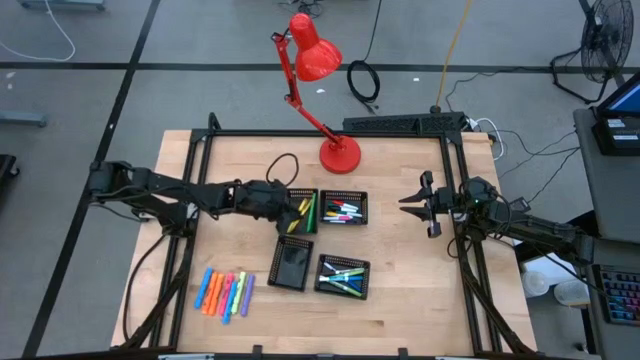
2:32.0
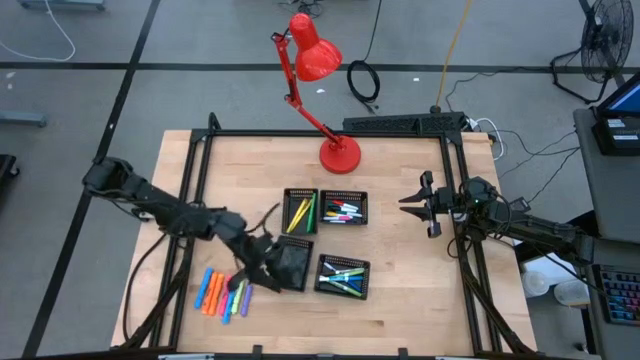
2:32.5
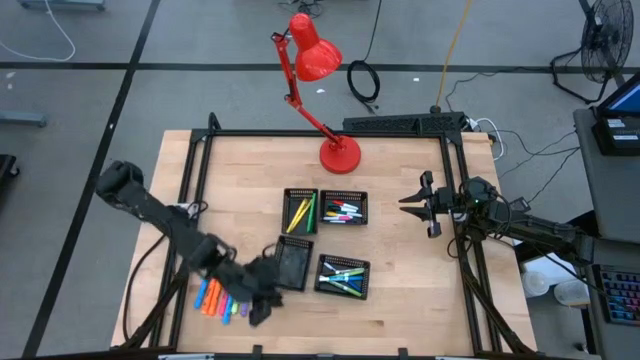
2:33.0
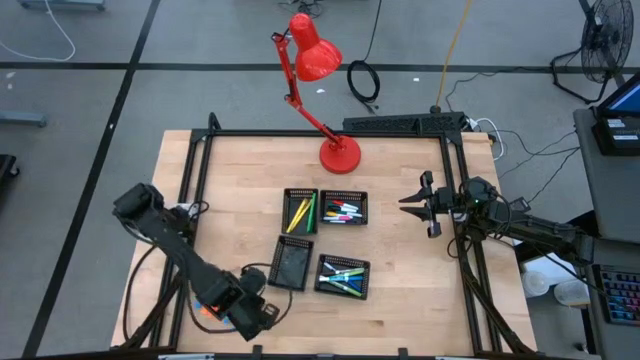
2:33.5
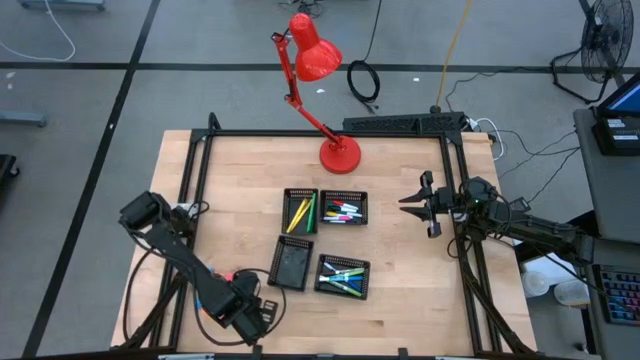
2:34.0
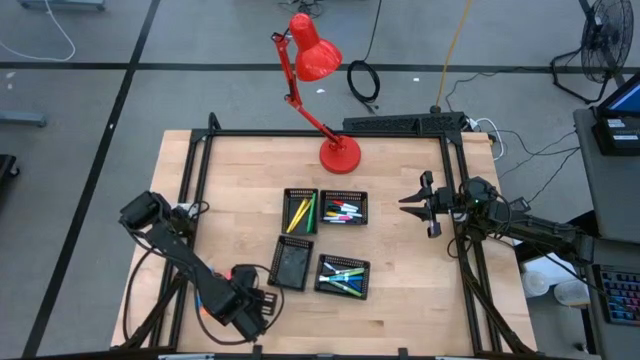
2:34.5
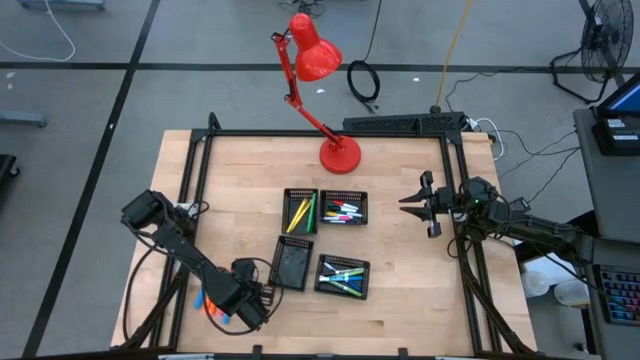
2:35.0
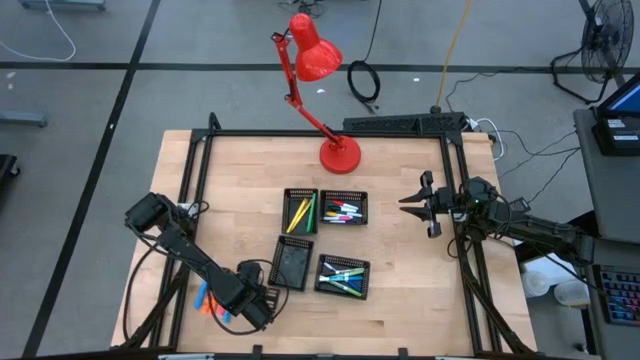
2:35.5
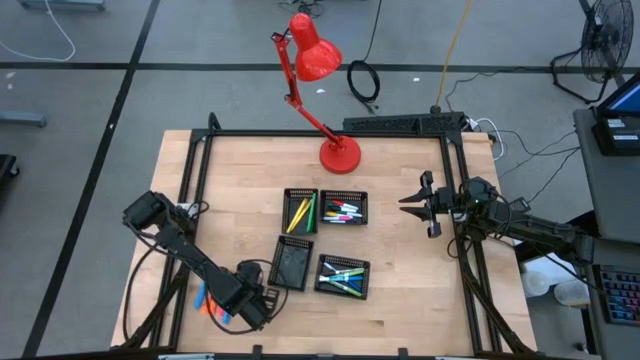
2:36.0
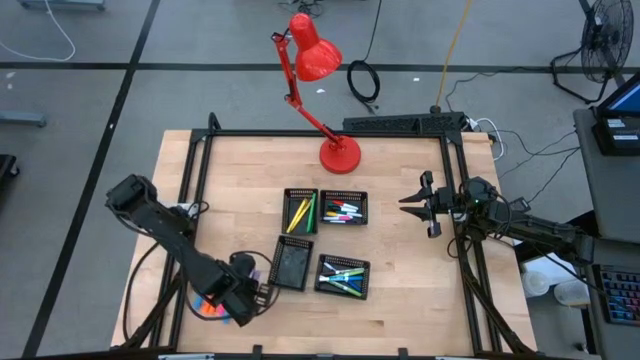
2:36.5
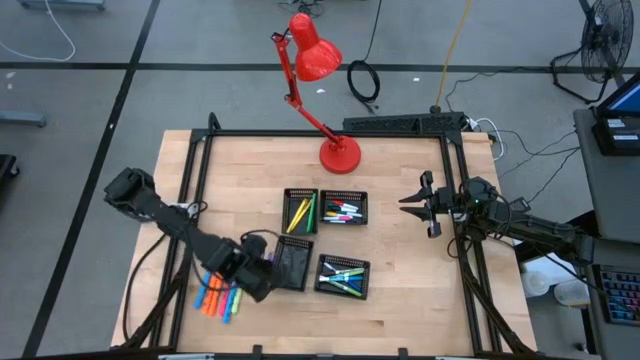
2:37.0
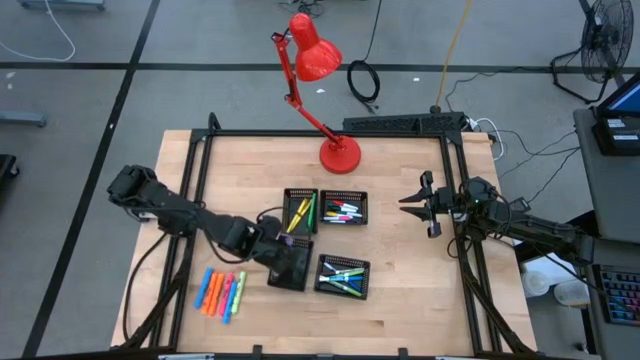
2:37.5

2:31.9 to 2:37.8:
Task: Pick & Place Markers
Put the purple highlighter into the bottom left black bin

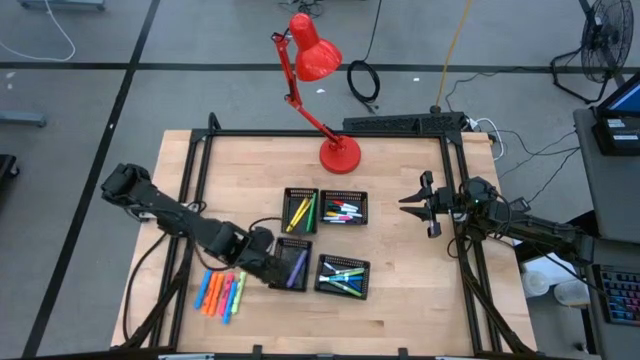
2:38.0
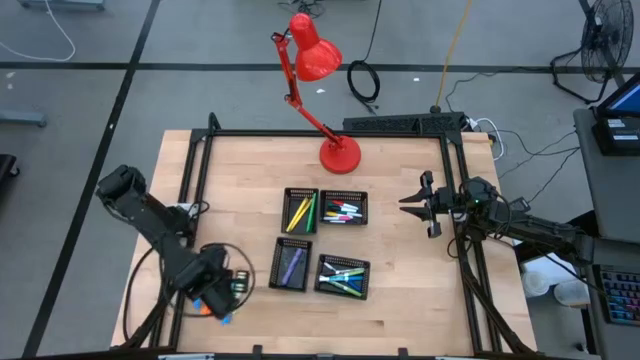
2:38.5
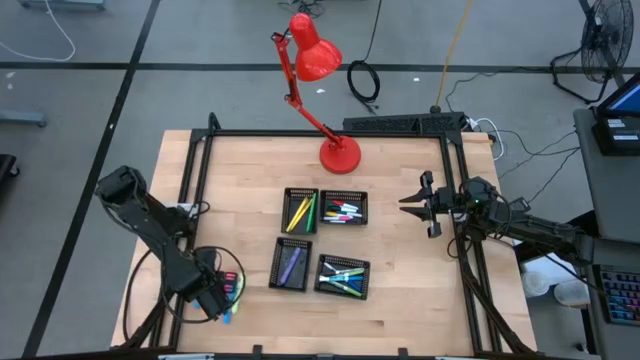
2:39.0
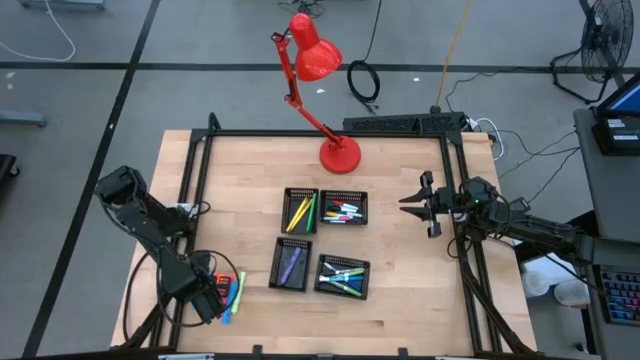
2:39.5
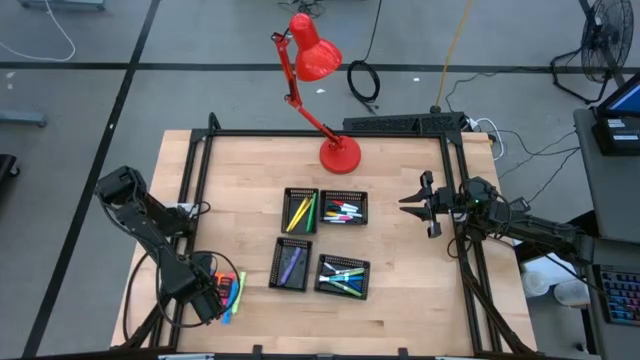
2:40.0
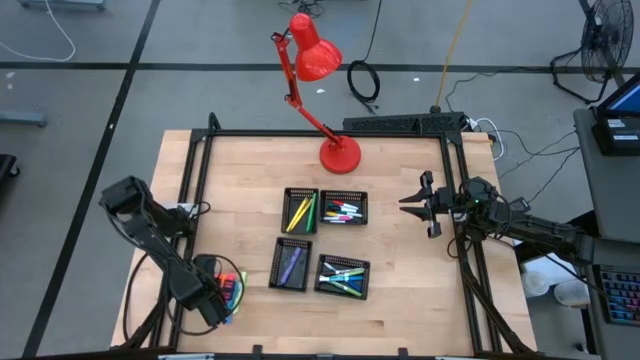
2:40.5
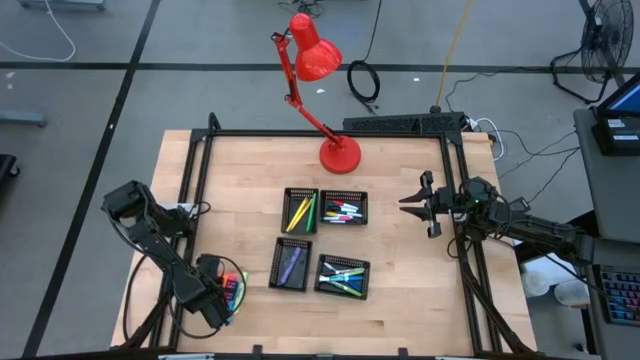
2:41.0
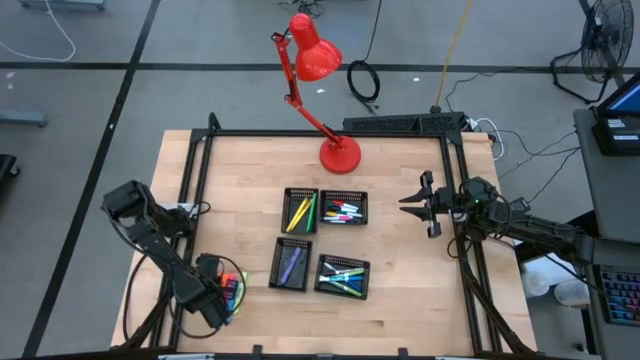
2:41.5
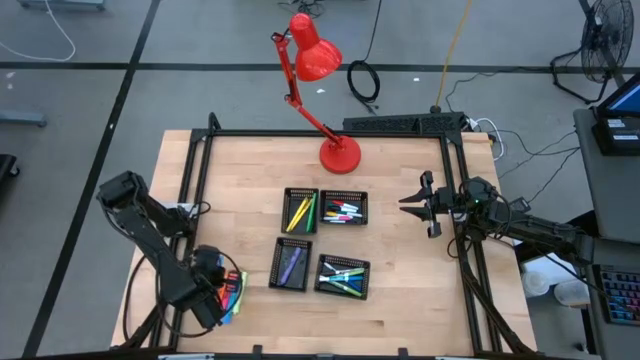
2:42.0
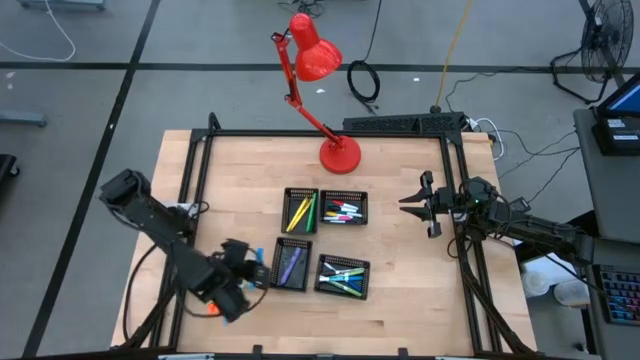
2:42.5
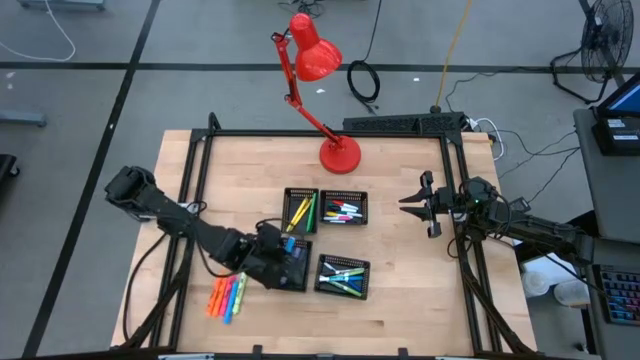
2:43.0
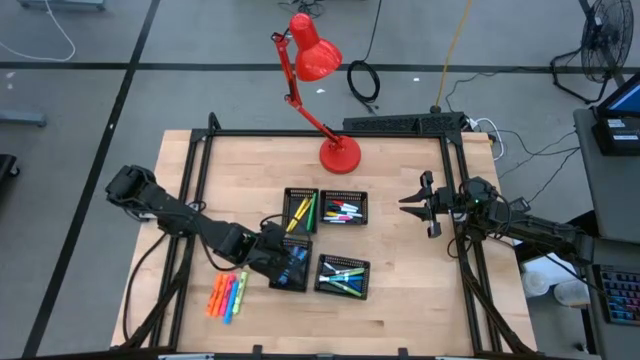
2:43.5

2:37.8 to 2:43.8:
Put the blue highlighter into the bottom left black bin

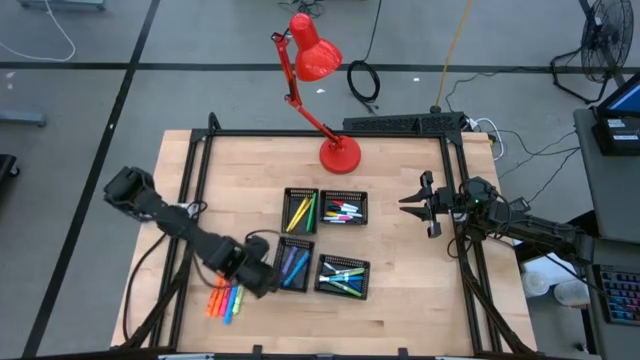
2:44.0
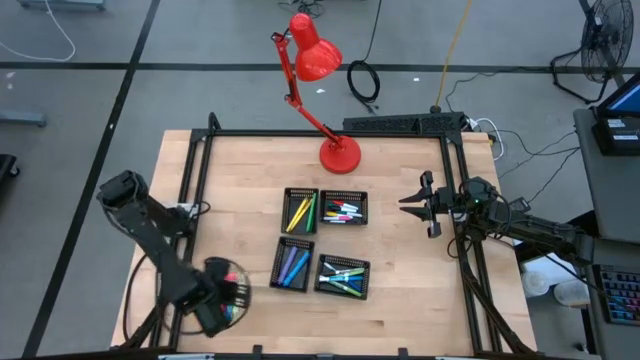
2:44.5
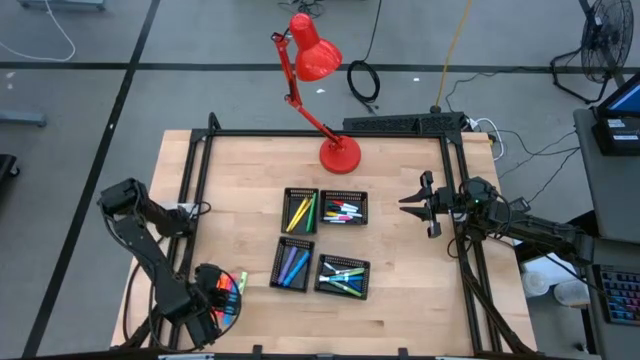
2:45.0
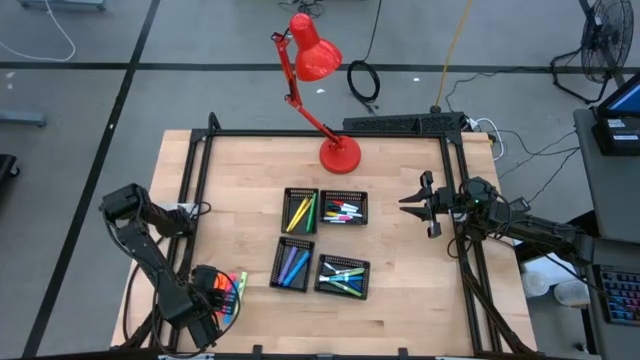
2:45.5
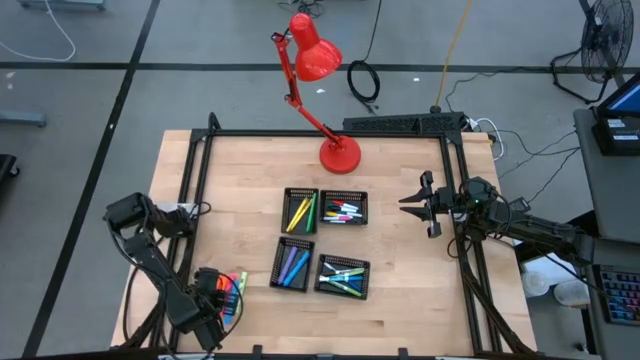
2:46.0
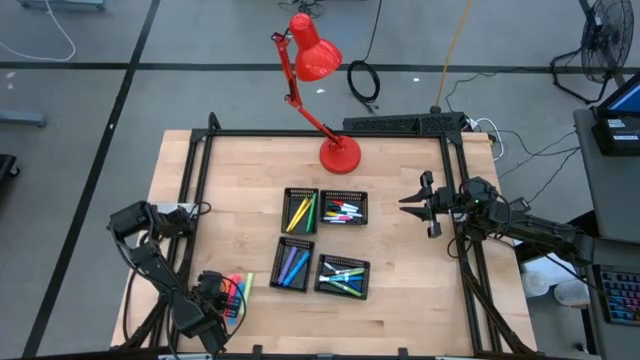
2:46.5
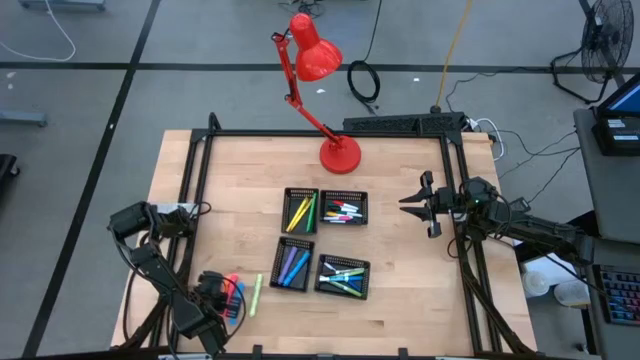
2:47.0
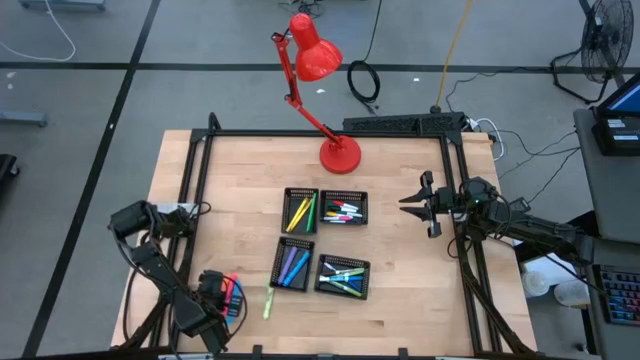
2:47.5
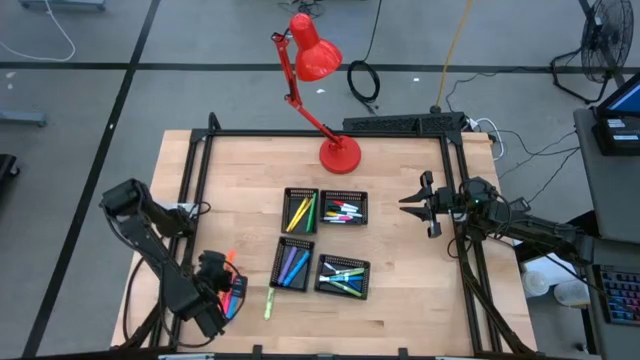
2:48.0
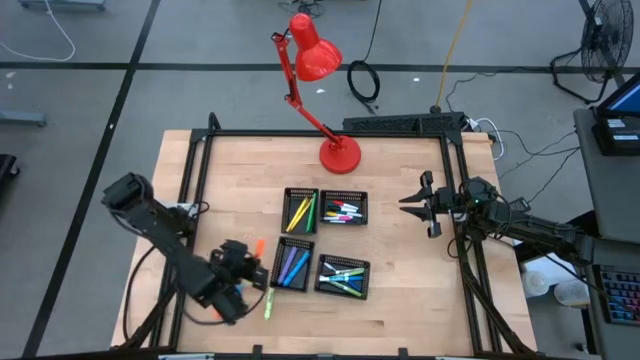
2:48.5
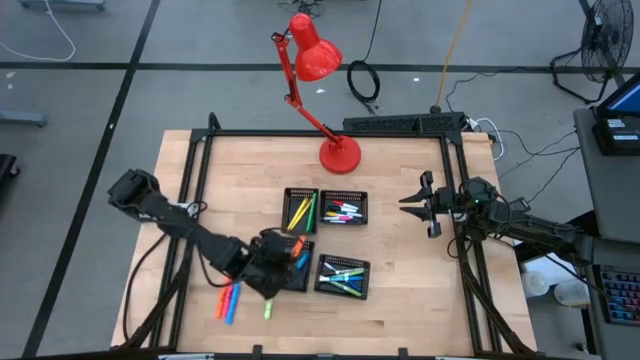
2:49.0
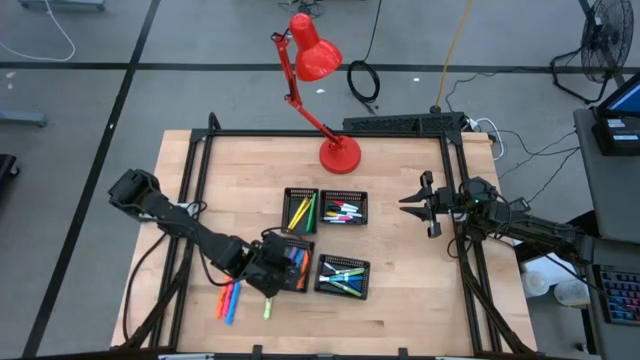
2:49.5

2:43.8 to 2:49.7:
Put the orange highlighter into the bottom left black bin

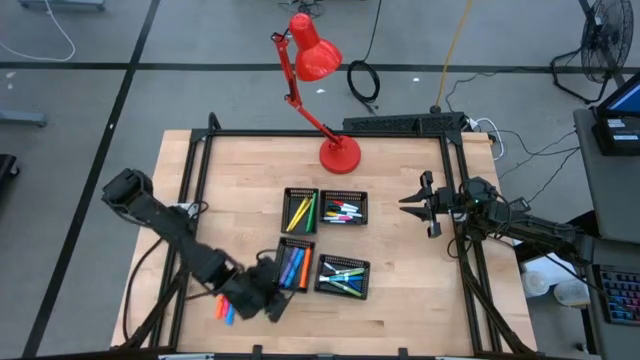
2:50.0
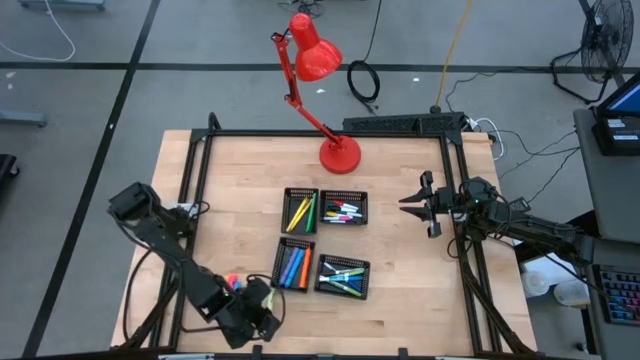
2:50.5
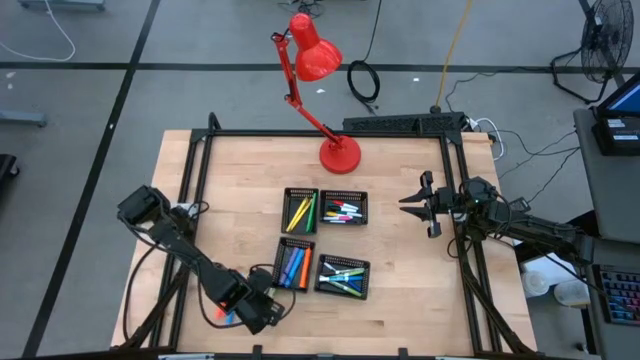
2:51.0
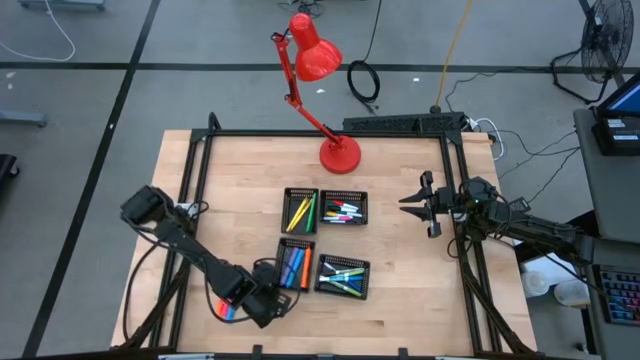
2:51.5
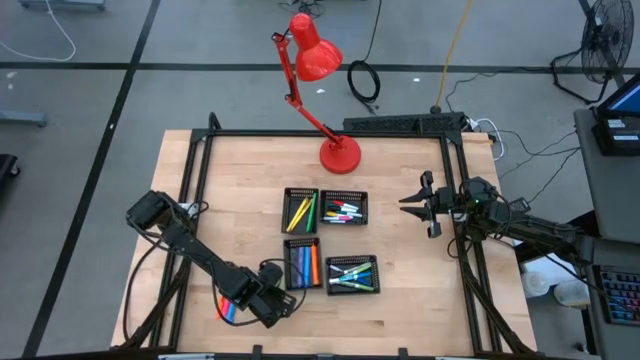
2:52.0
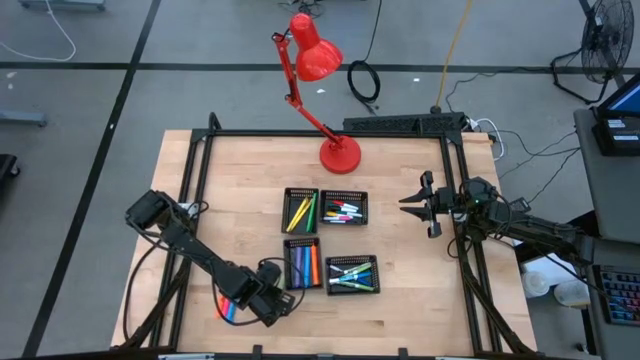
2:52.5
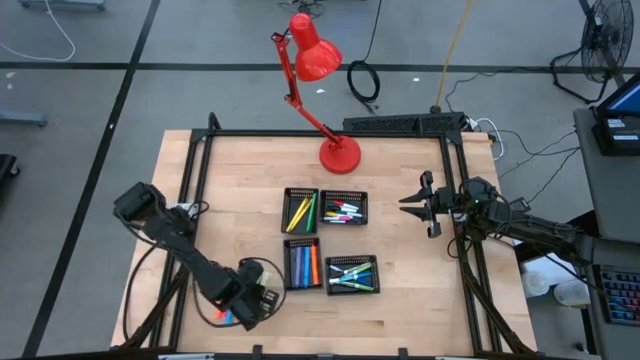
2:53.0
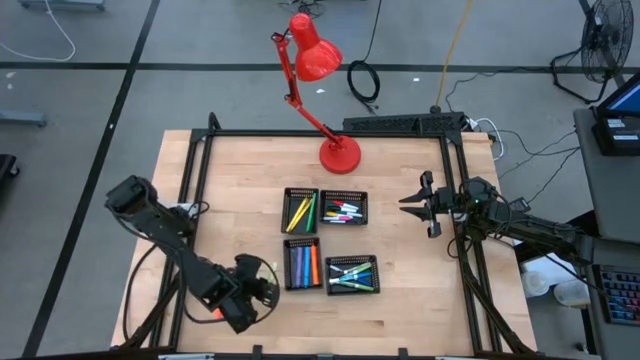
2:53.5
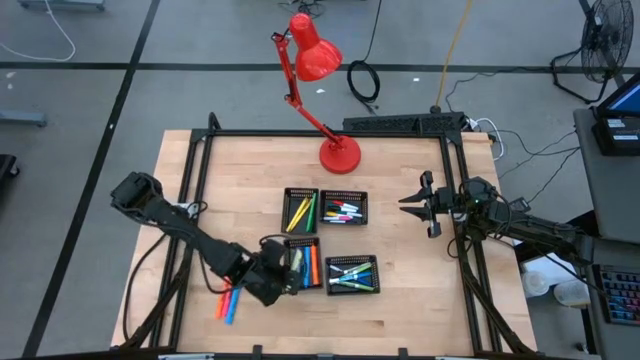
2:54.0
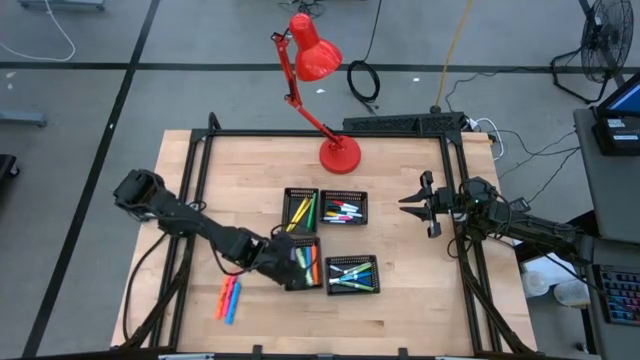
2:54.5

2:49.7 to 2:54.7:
Put the light green highlighter into the bottom left black bin
